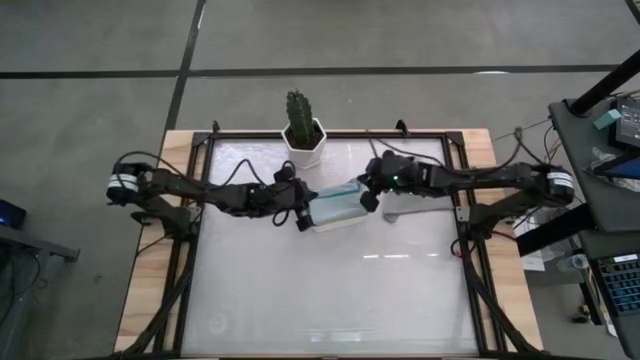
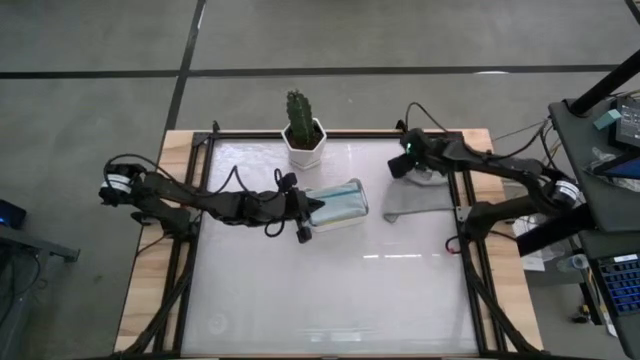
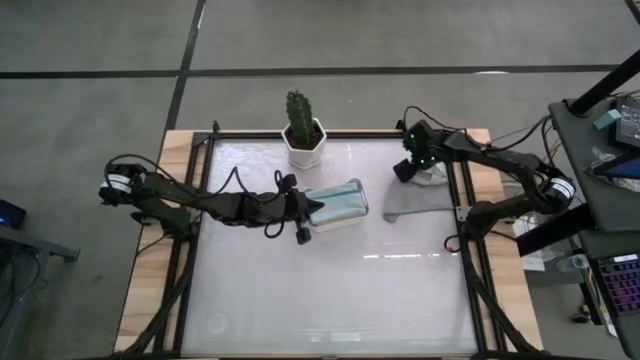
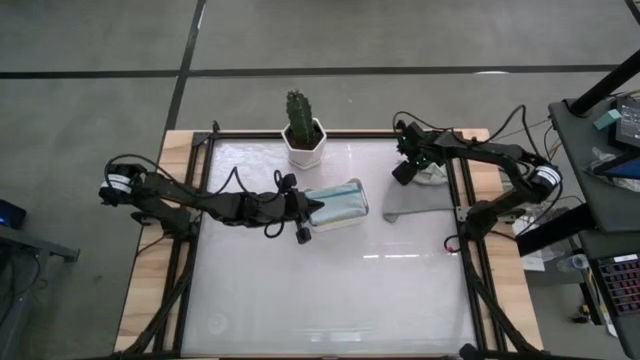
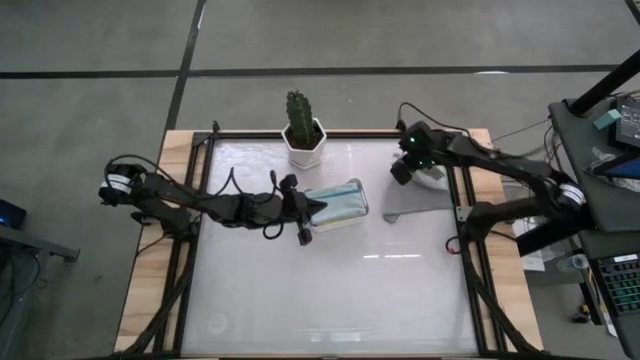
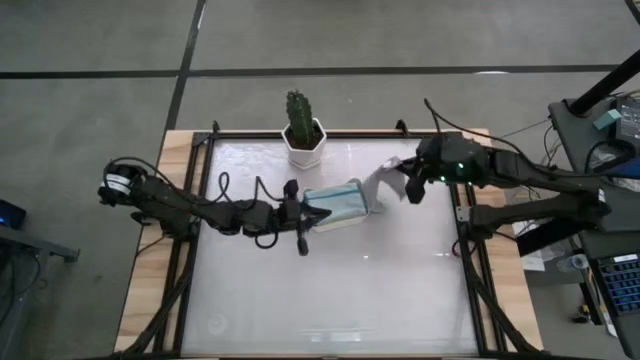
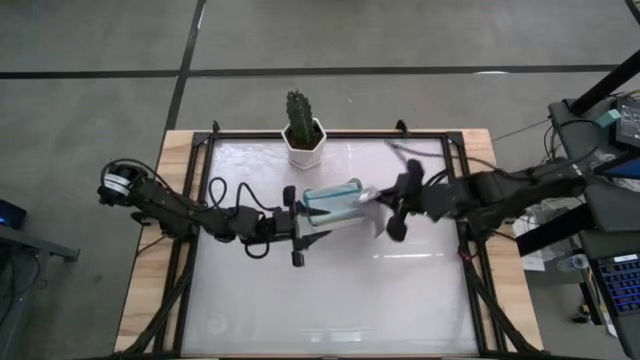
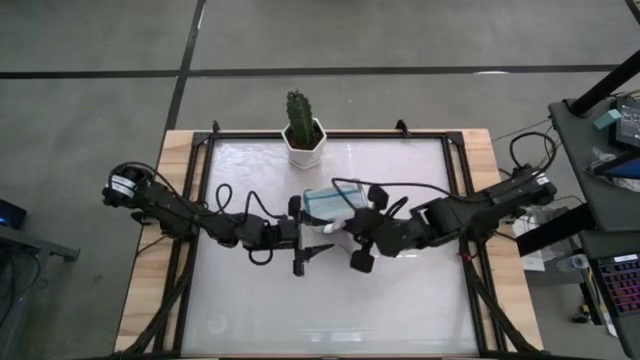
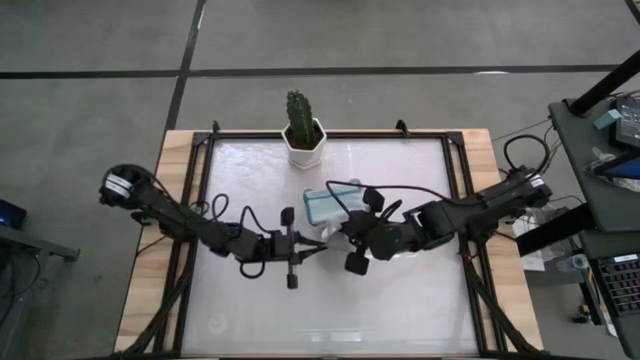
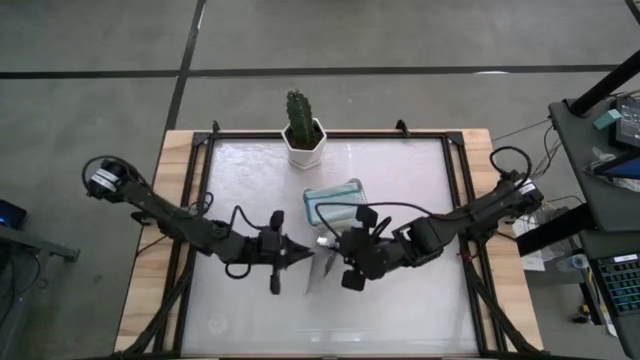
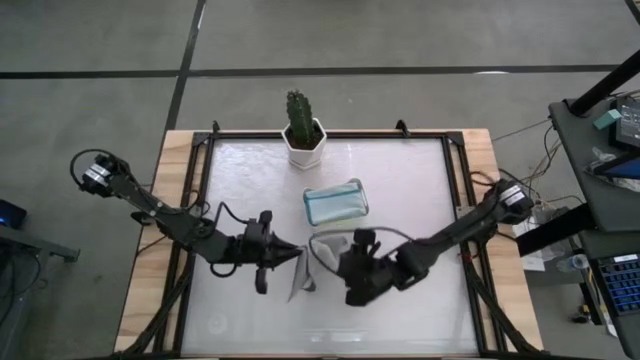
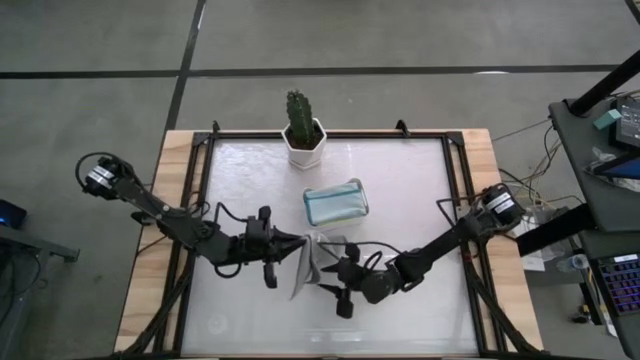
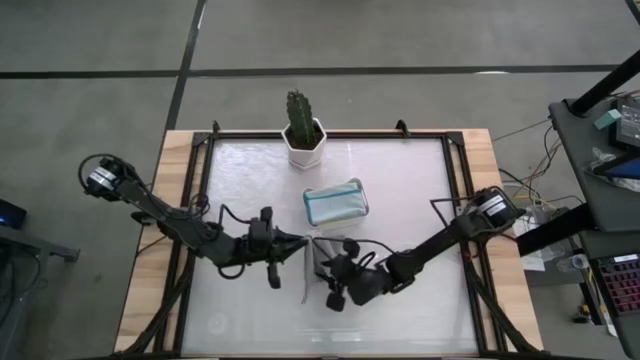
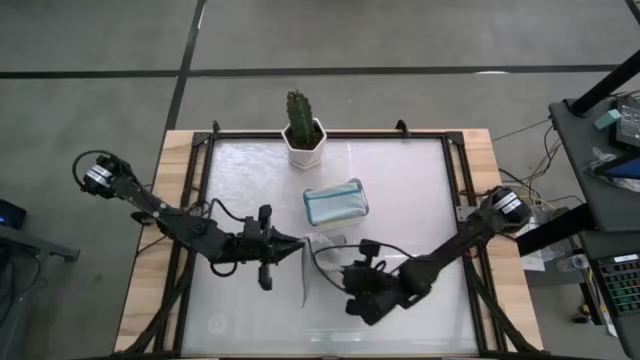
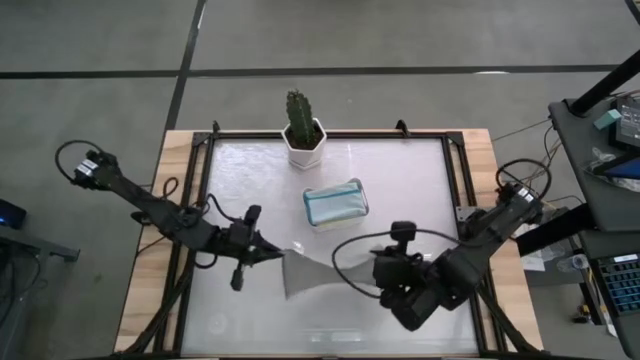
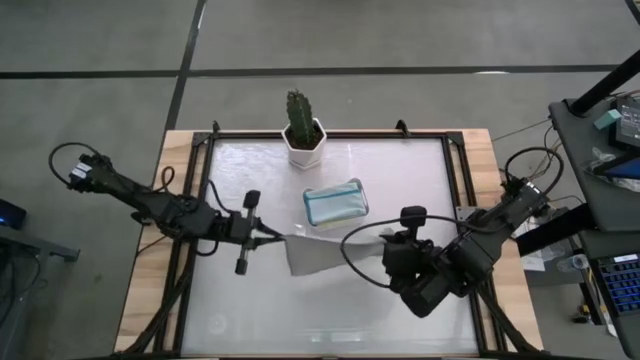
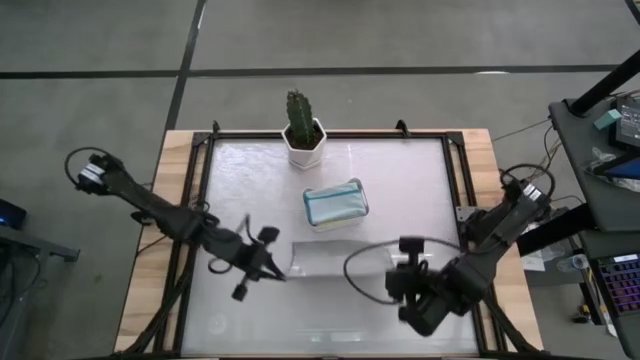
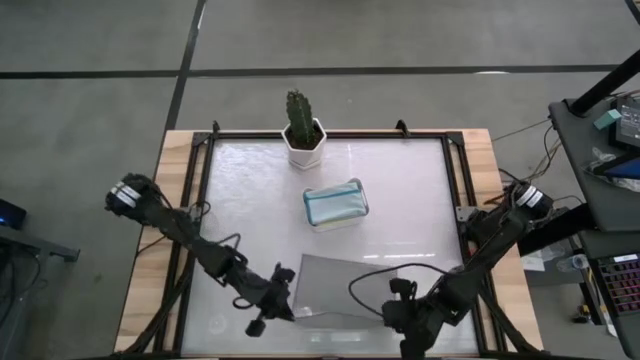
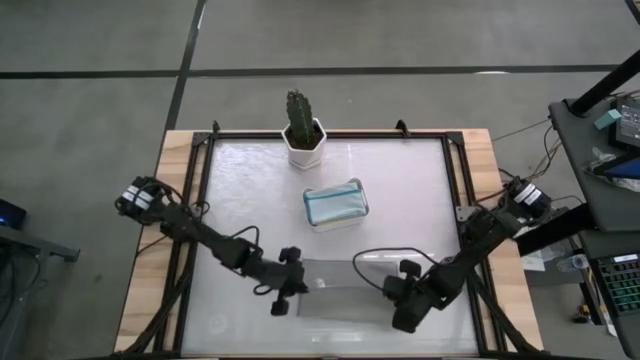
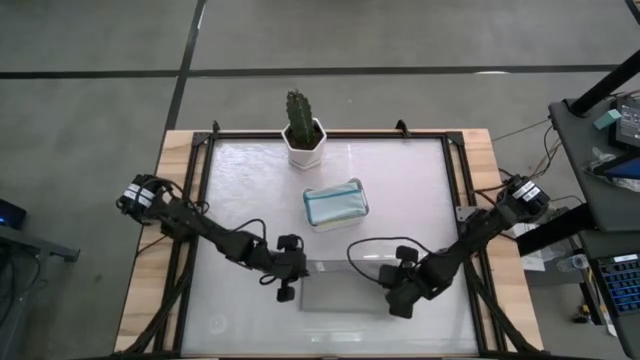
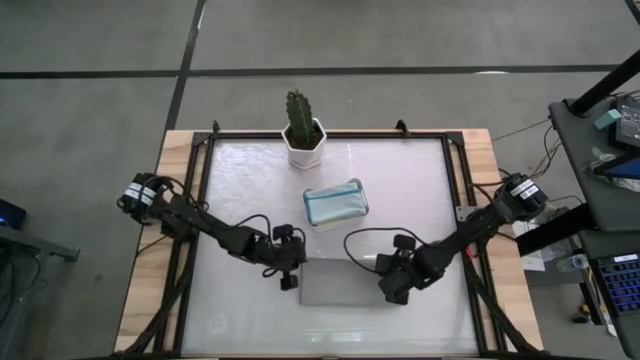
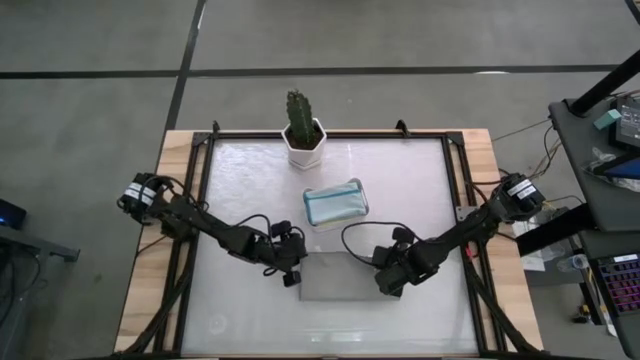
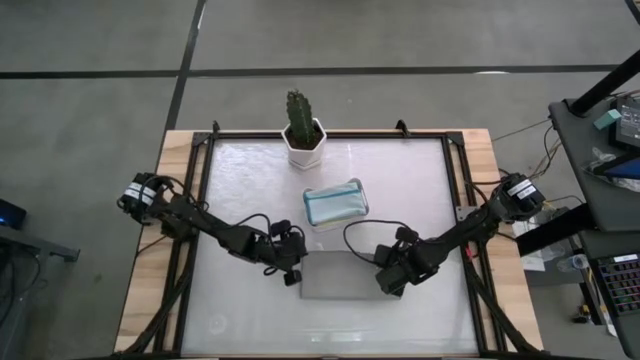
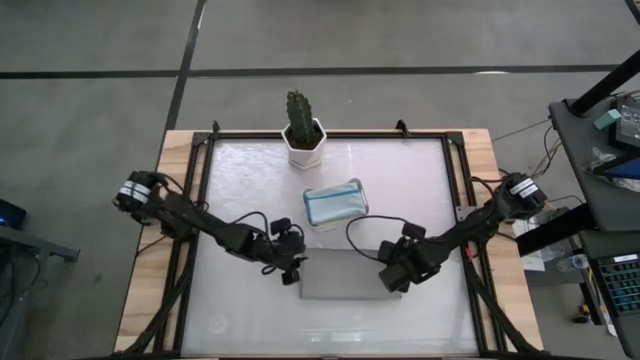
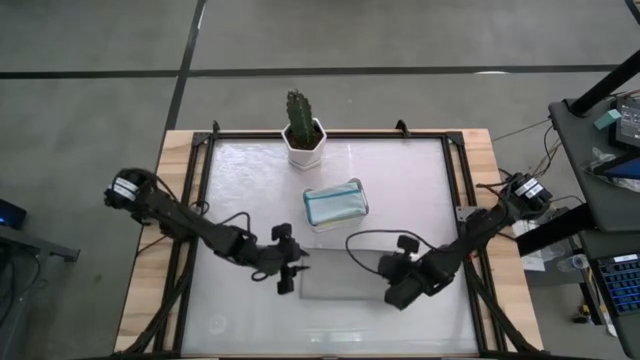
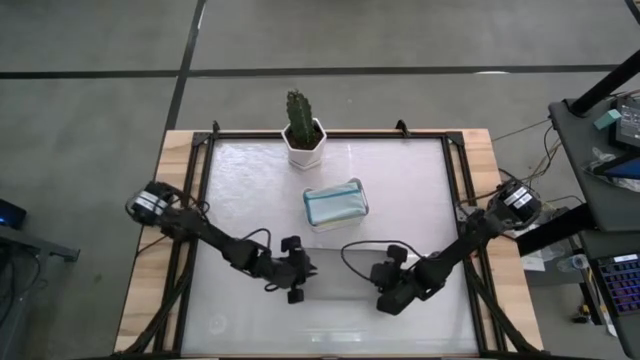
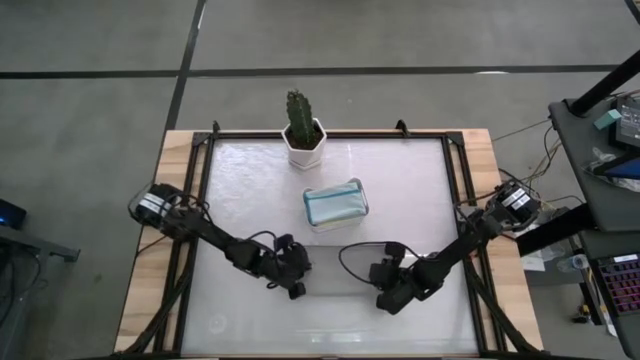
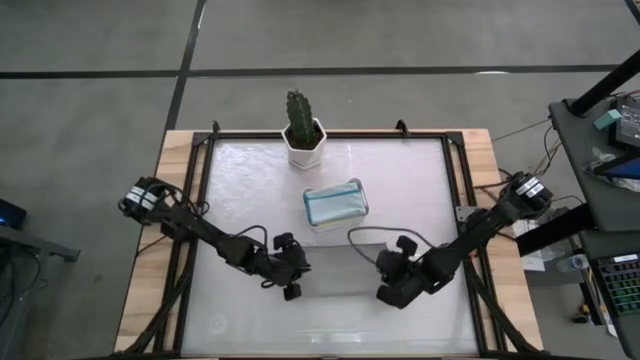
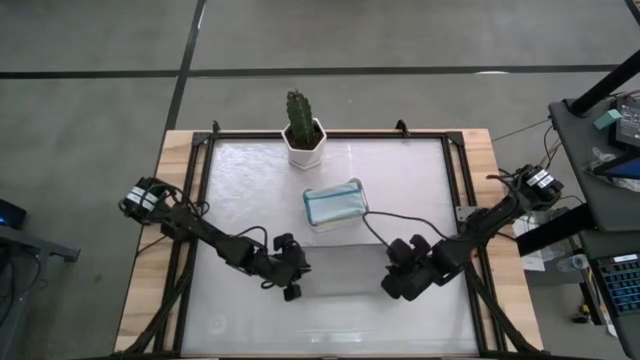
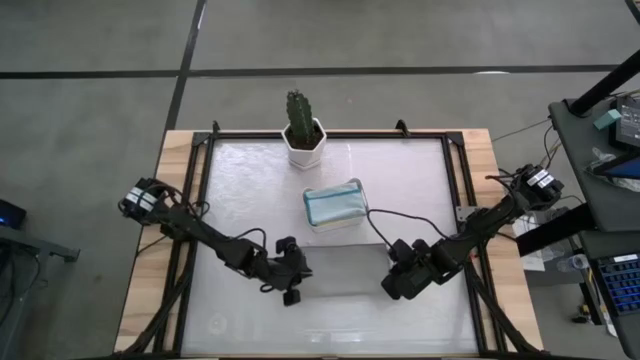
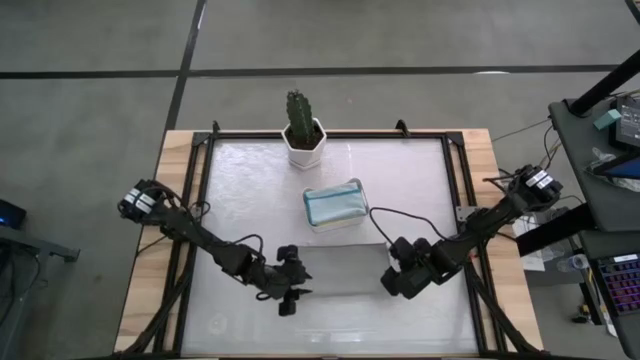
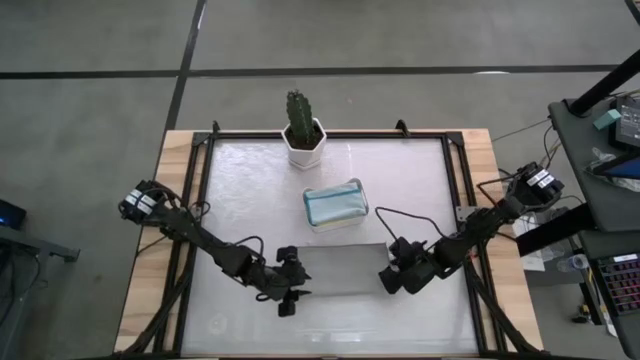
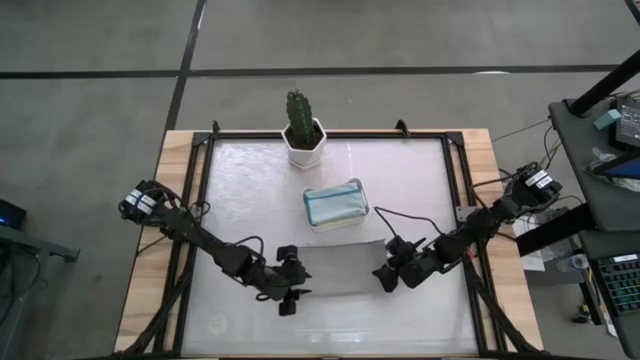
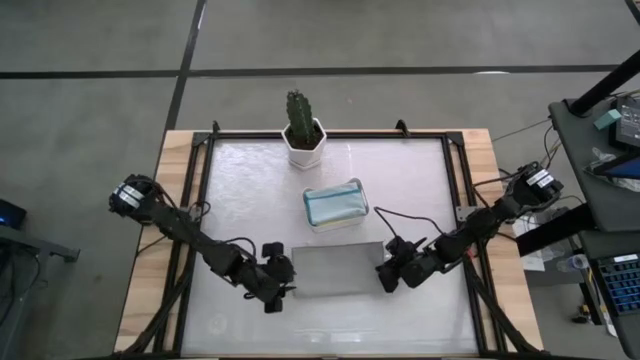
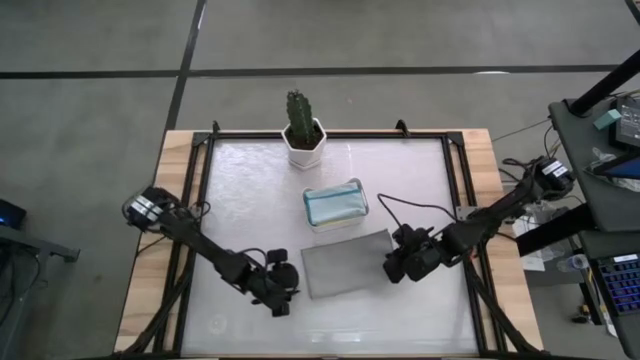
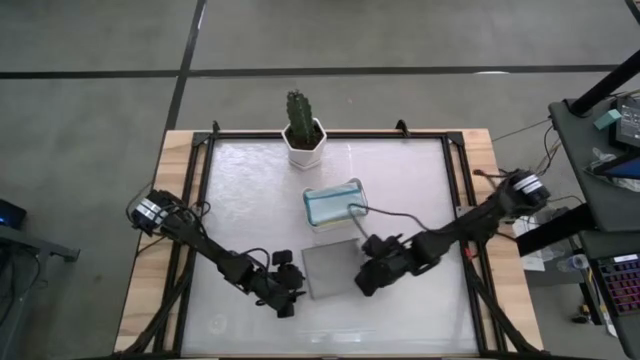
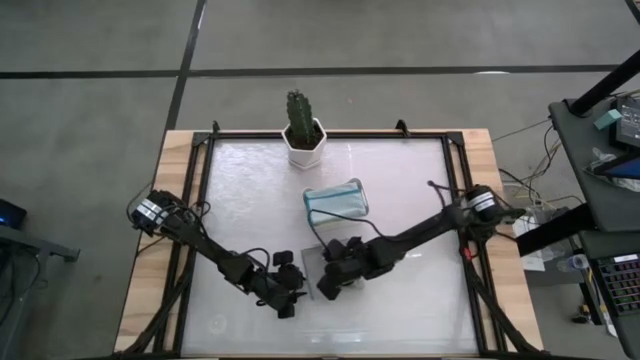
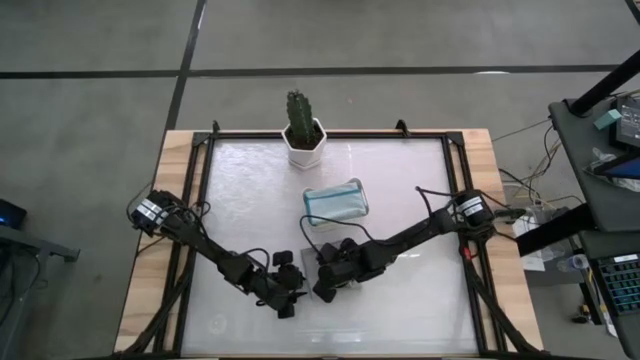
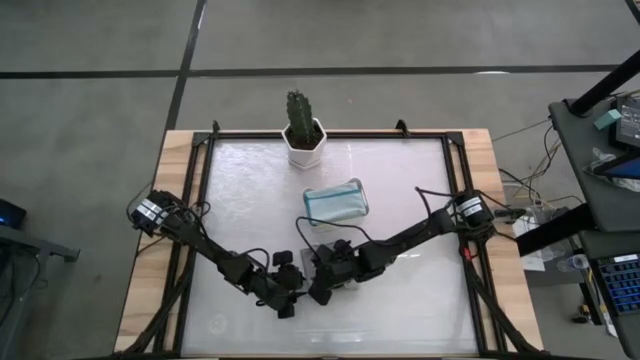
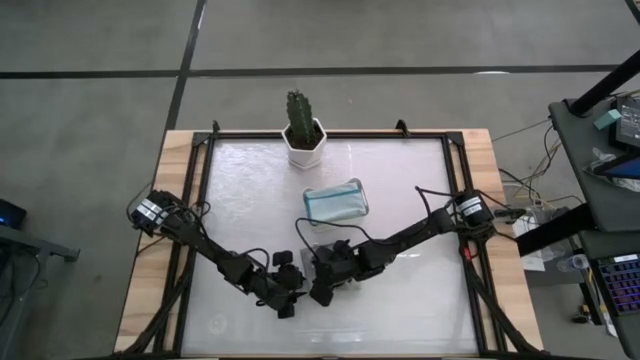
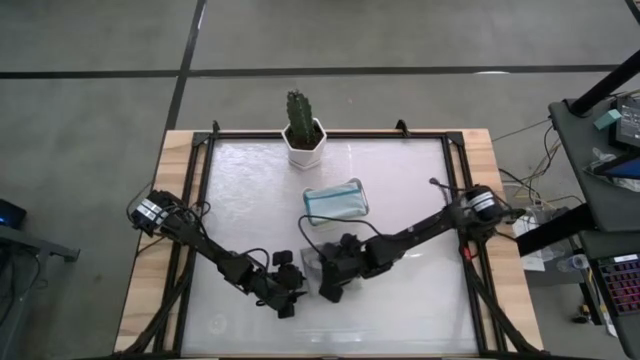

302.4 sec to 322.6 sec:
Task: Fold microfiber towels
Fold the gray towel

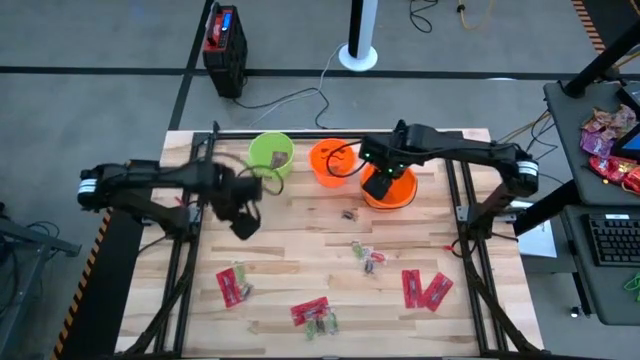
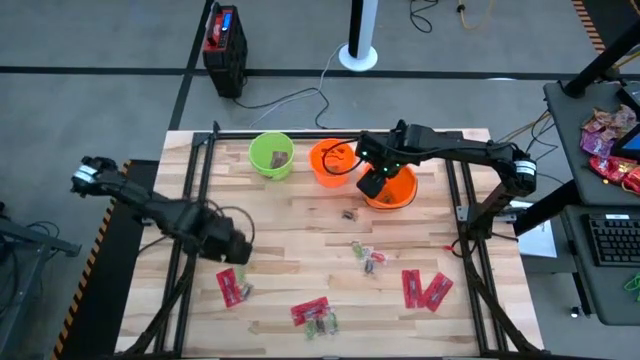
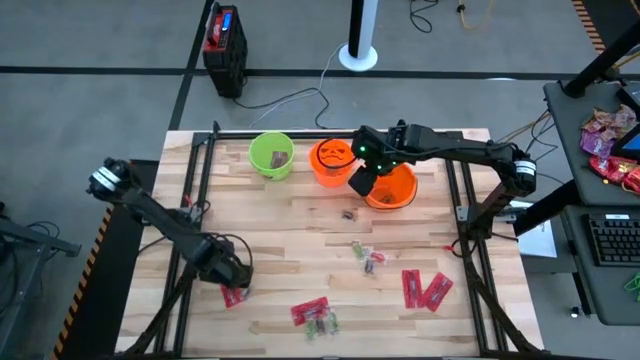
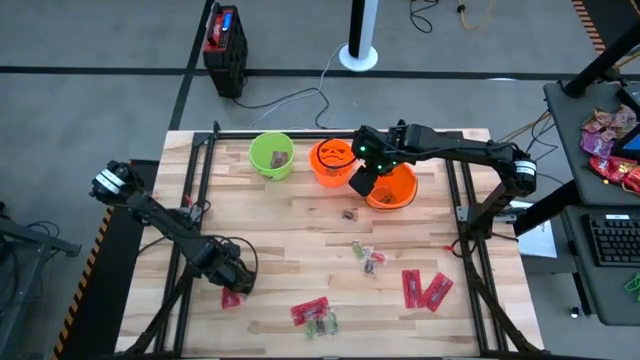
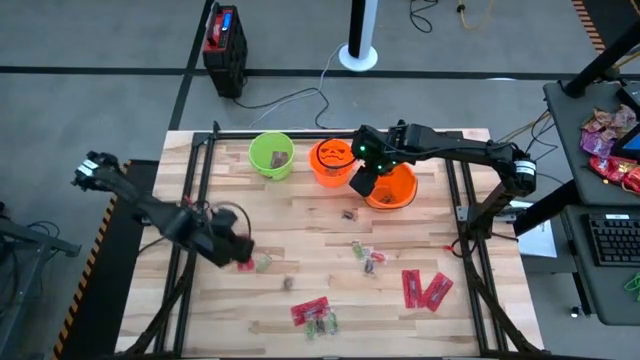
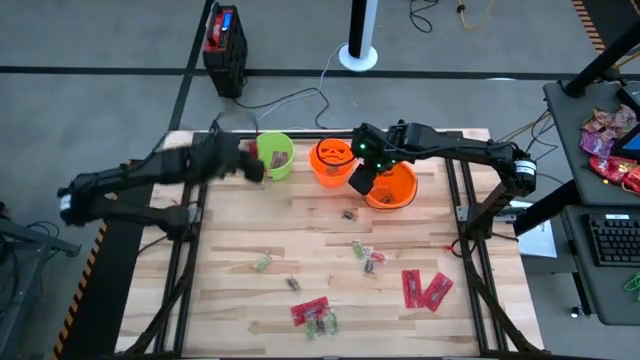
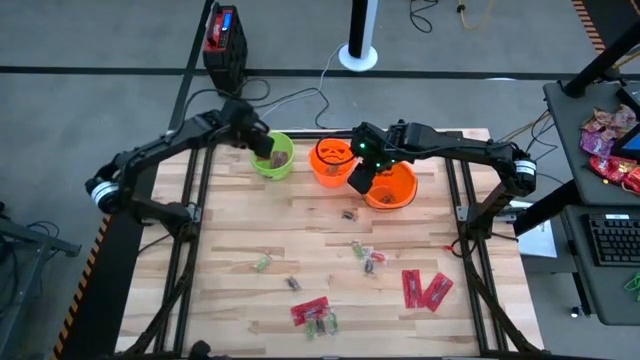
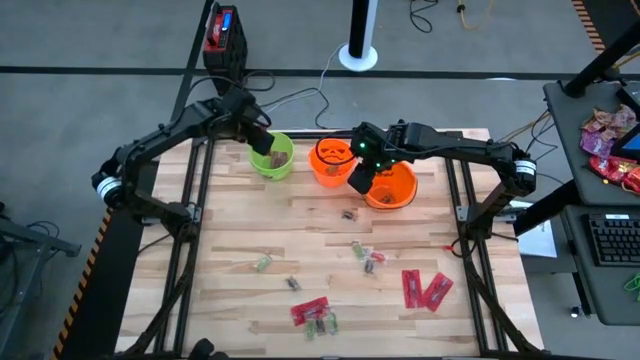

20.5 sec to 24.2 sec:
Task: Sort candy by brand, put in halloween buckets
Put the red candy into the green bucket
